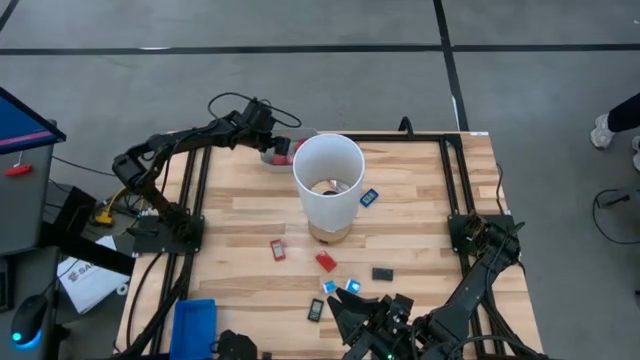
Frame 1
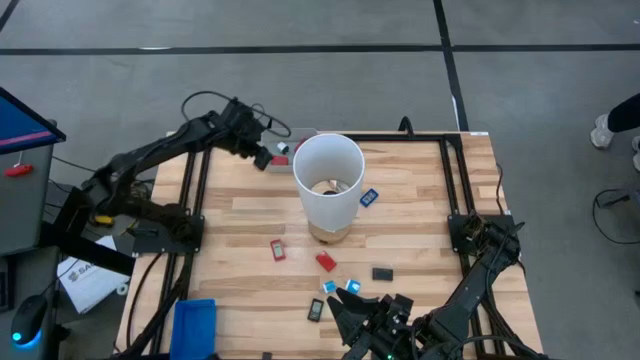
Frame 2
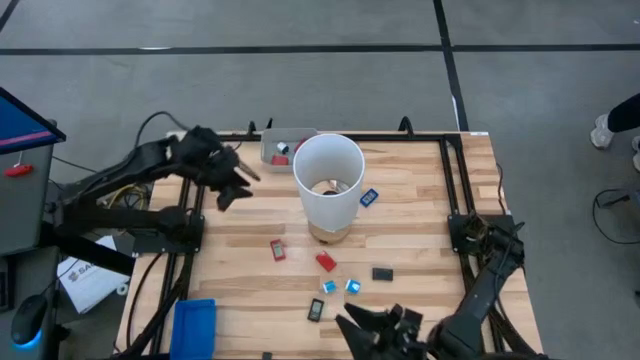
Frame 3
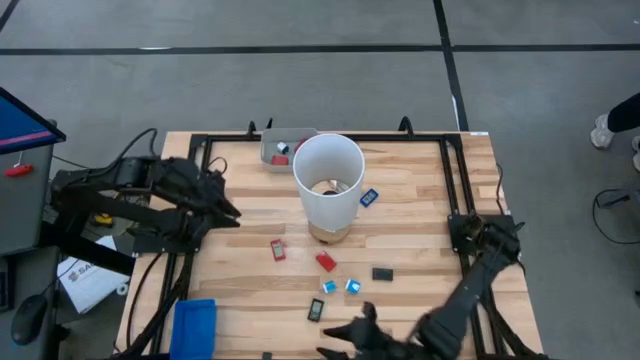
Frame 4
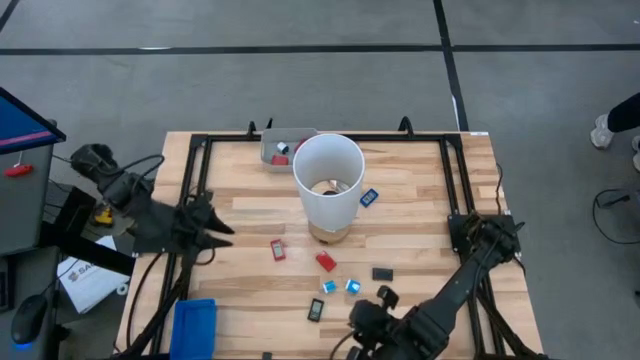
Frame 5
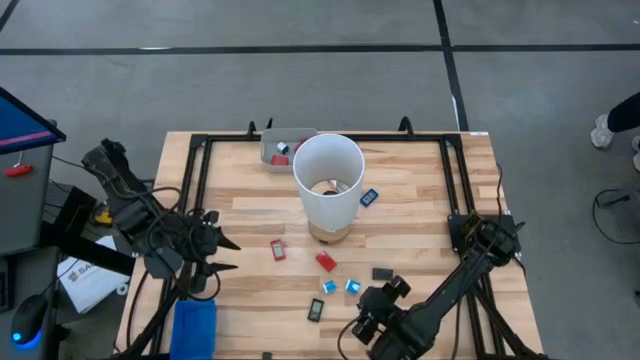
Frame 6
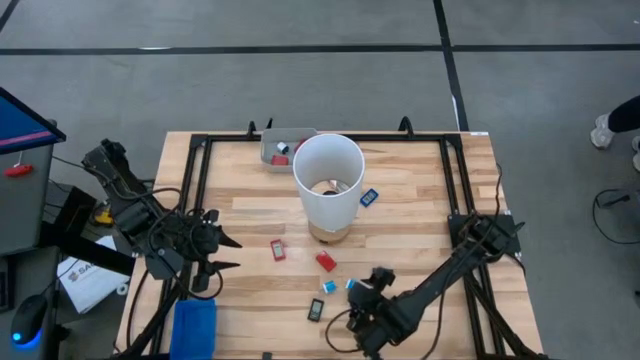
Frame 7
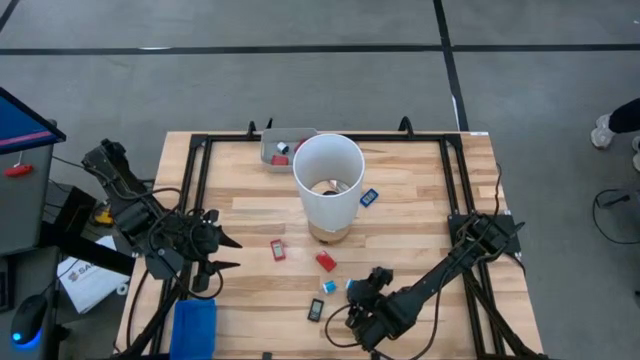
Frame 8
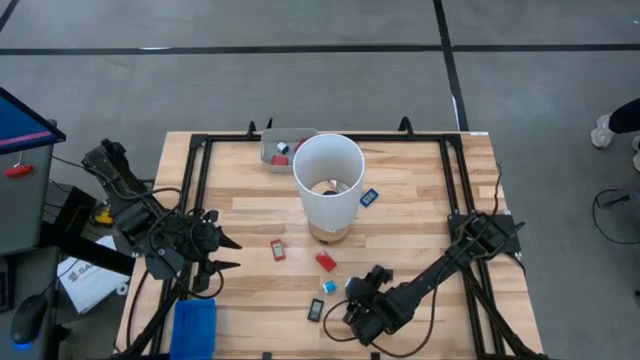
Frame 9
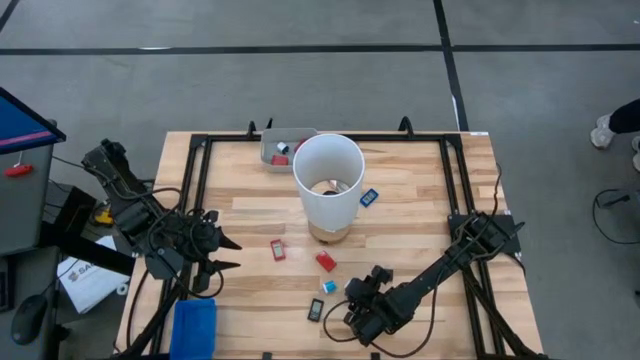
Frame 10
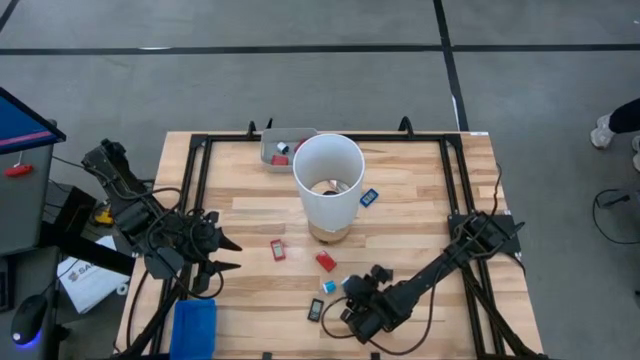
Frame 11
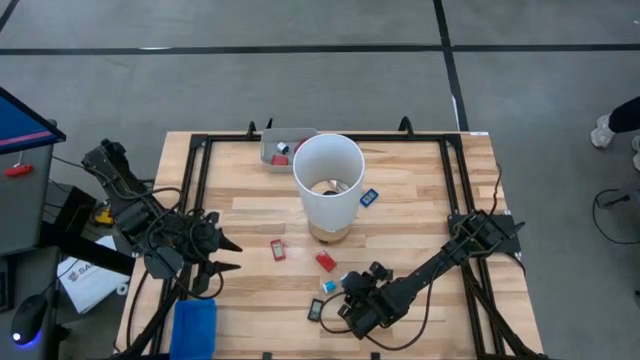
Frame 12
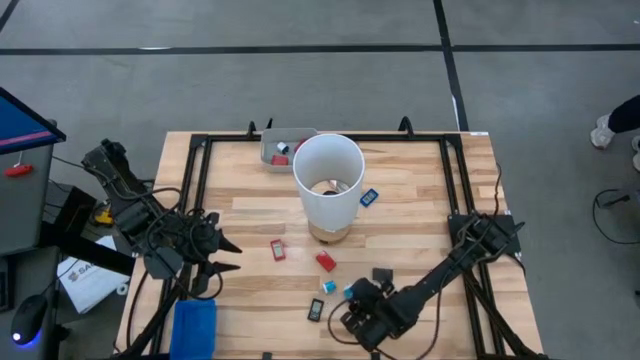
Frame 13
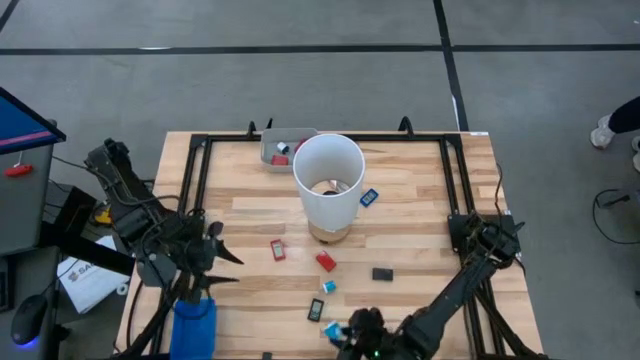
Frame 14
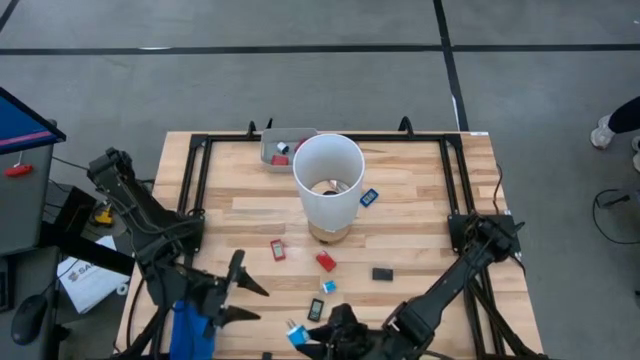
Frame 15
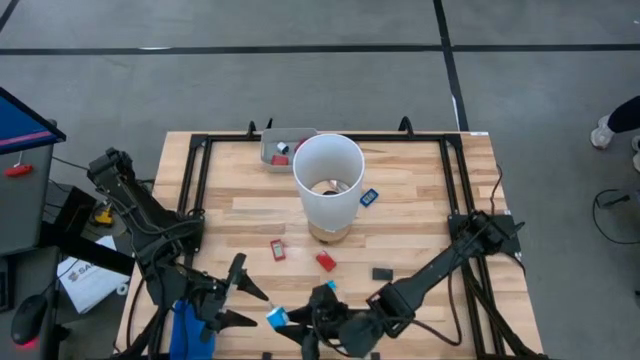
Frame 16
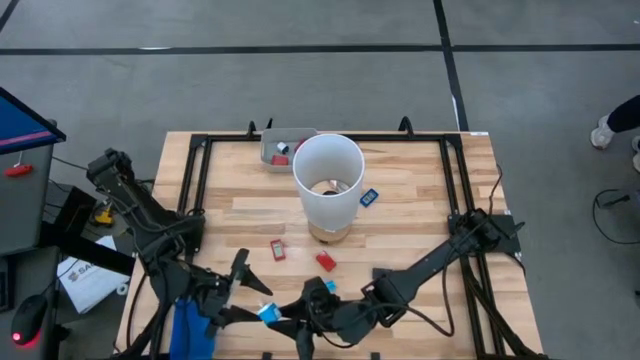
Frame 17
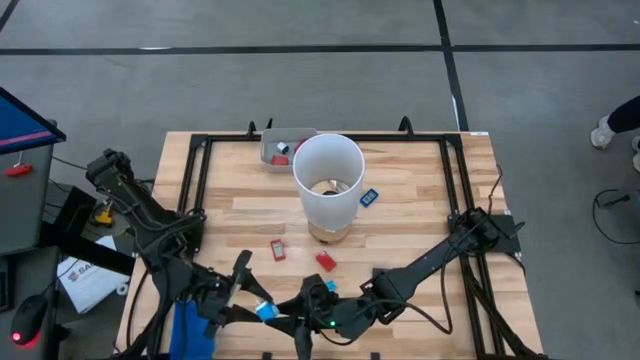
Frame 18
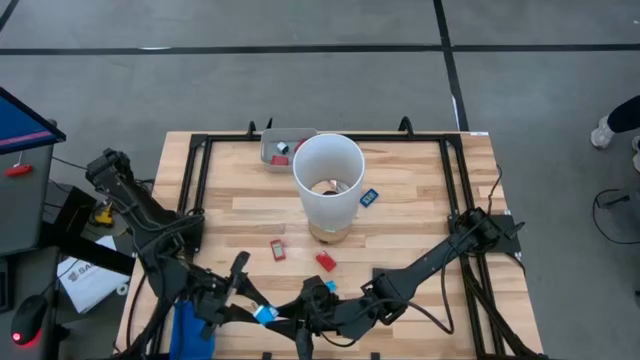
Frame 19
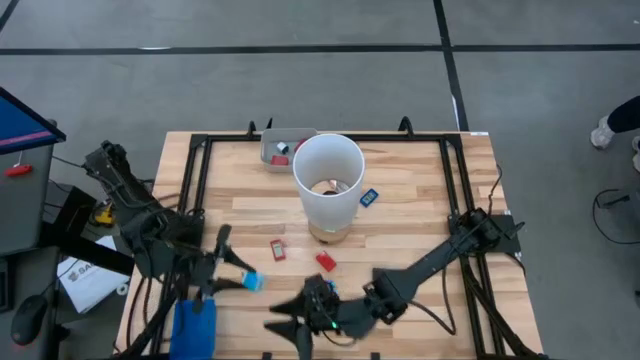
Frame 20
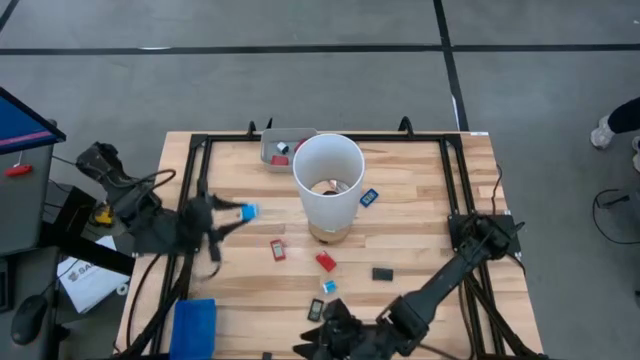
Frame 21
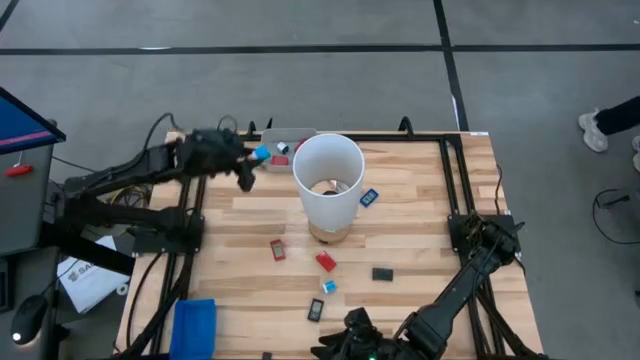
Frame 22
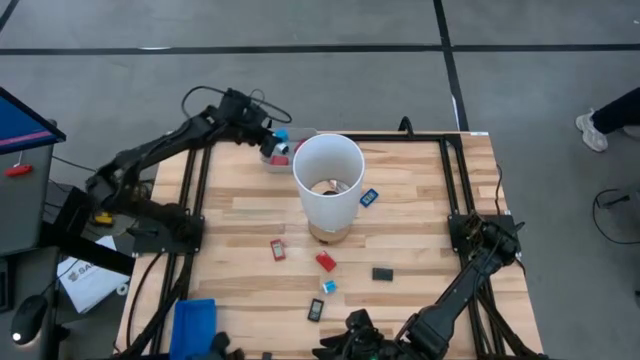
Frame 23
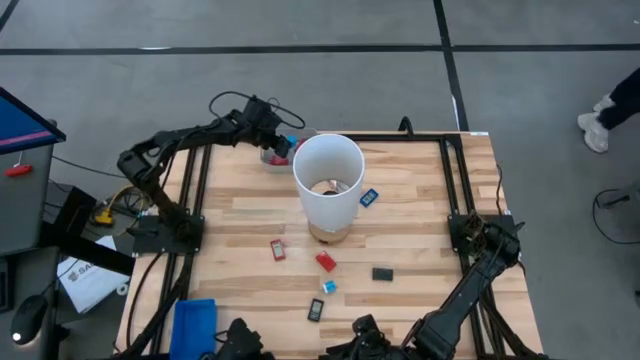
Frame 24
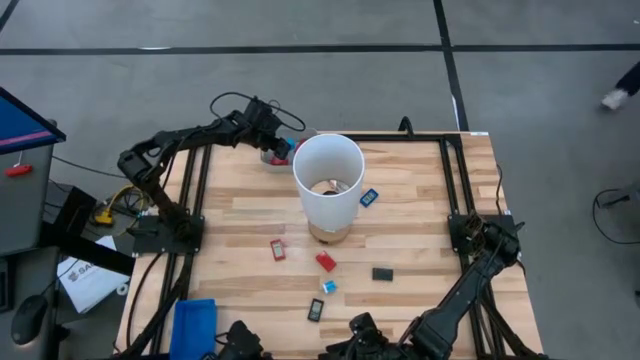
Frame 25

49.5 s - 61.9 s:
Task: Pick & Place Office items
Put the right blue charger adapter into the gray bin

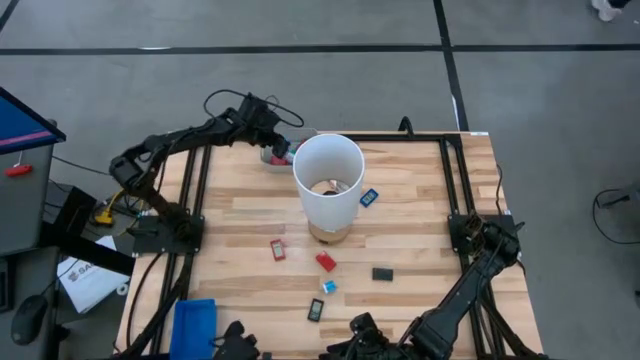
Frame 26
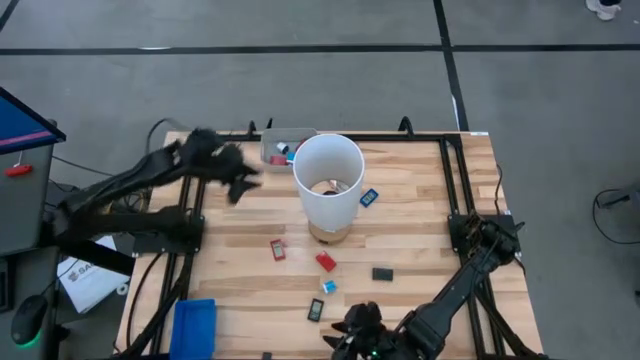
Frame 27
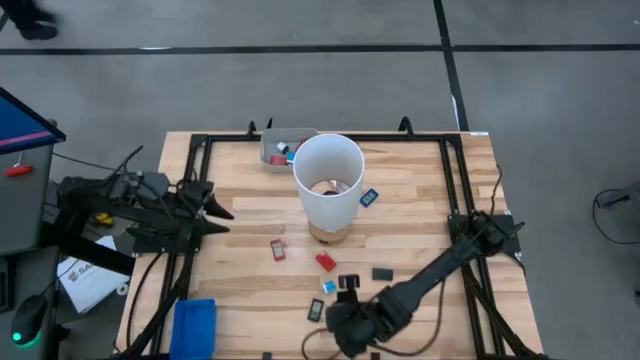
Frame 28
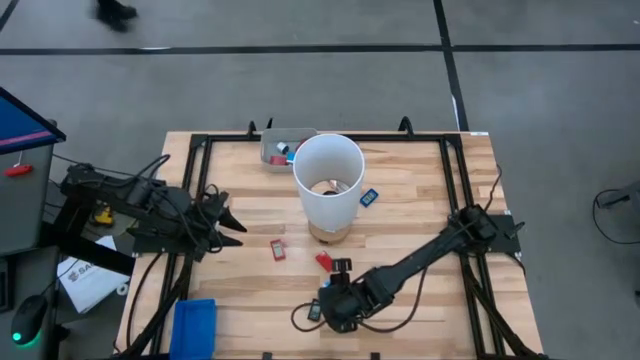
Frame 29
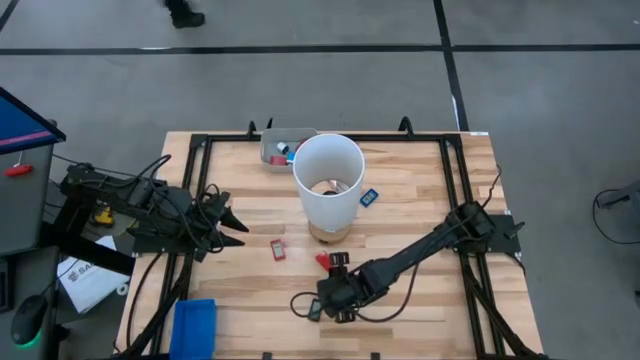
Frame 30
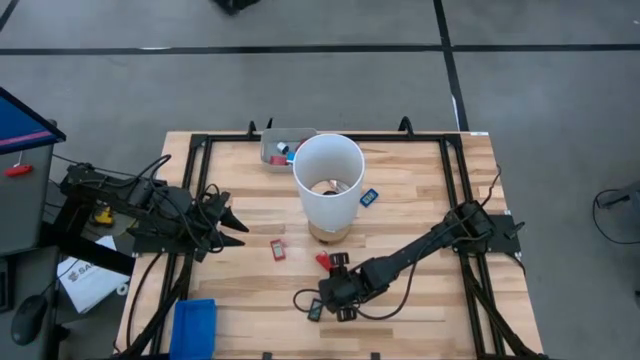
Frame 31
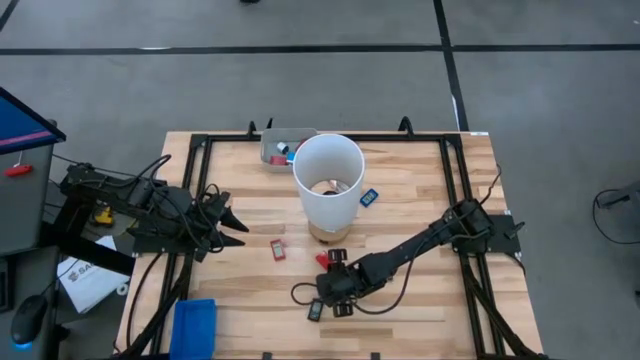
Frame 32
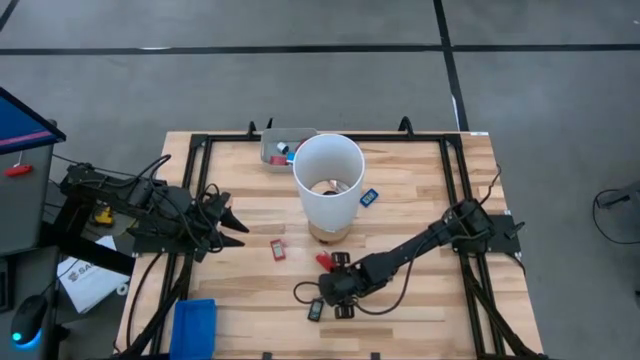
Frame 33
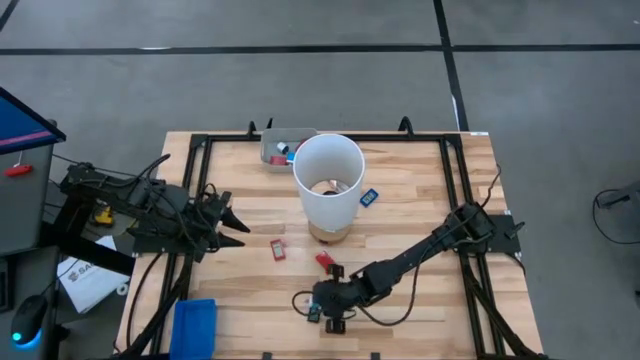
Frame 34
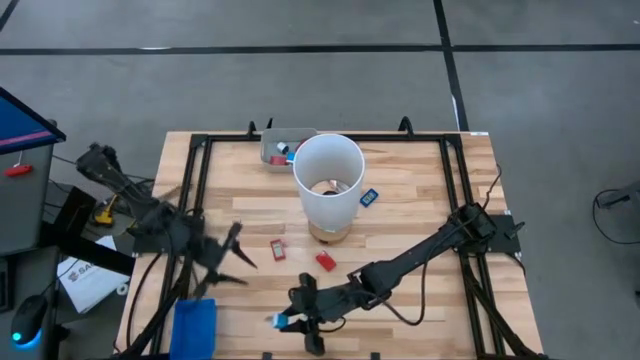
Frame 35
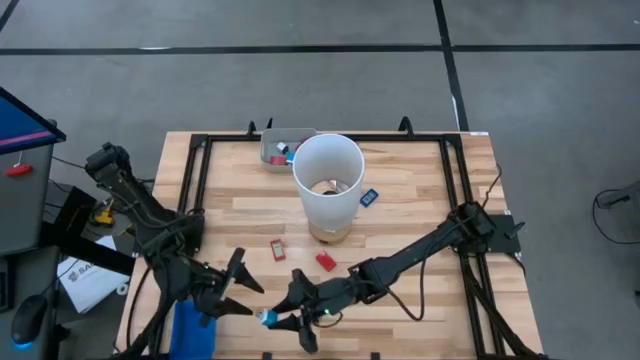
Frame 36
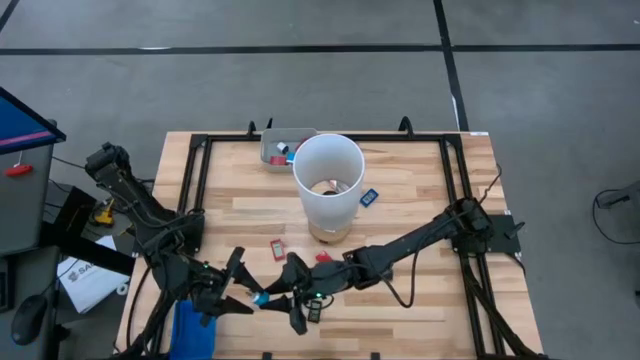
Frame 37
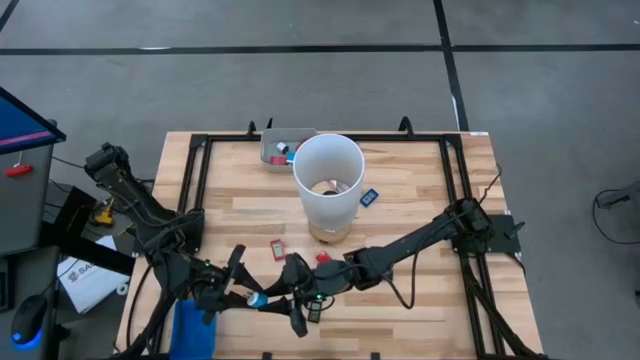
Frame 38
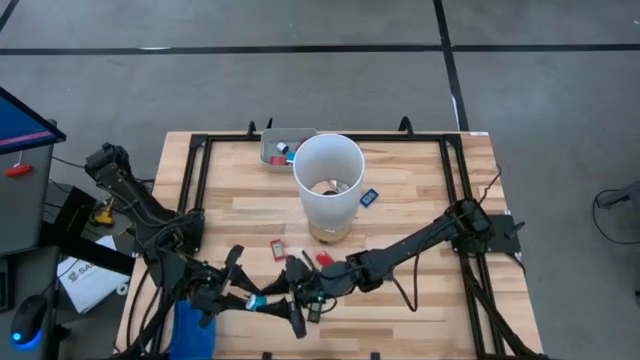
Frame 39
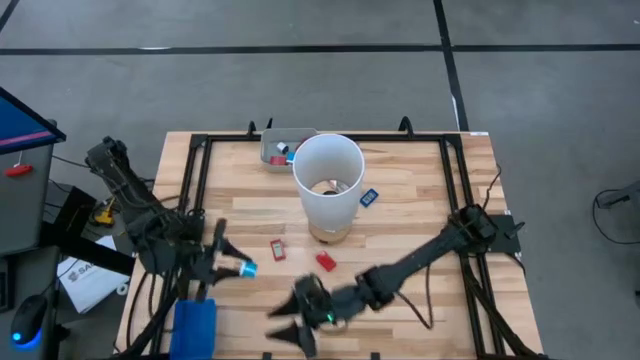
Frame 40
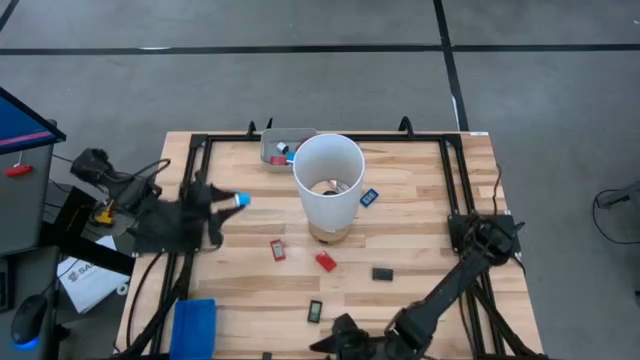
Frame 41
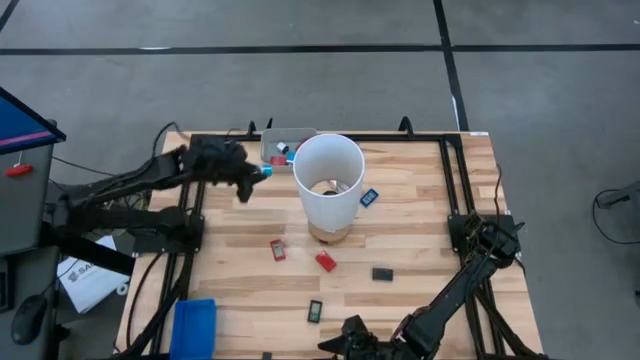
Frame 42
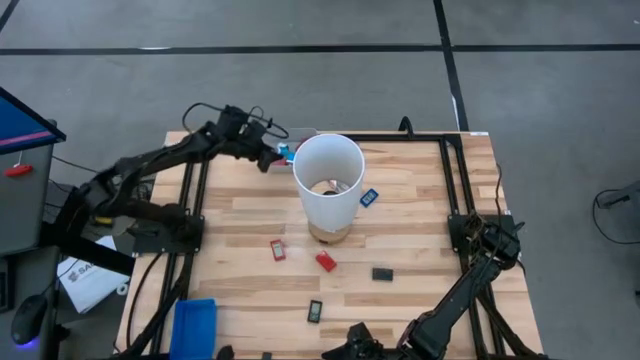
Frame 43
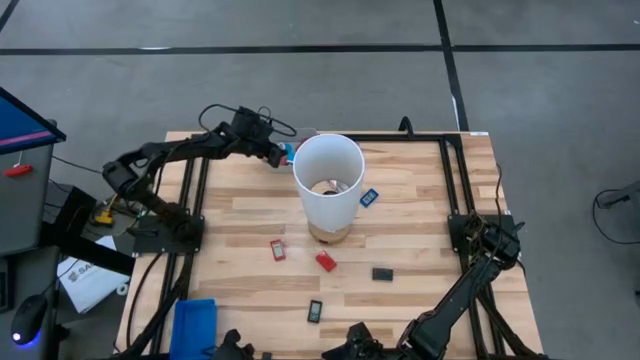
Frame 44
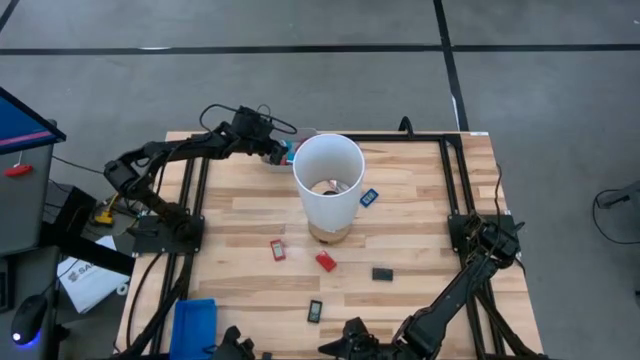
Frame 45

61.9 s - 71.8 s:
Put the blue charger adapter into the gray bin
